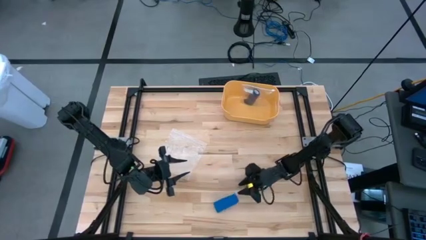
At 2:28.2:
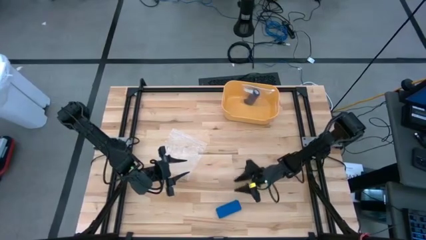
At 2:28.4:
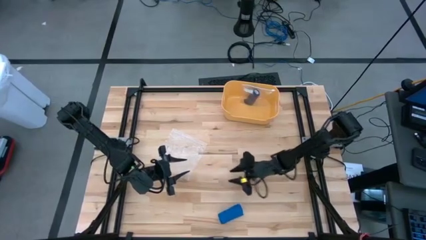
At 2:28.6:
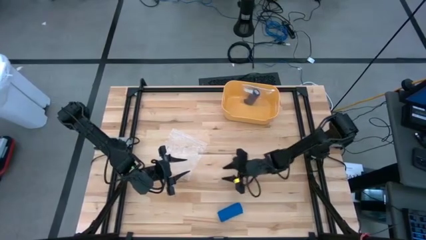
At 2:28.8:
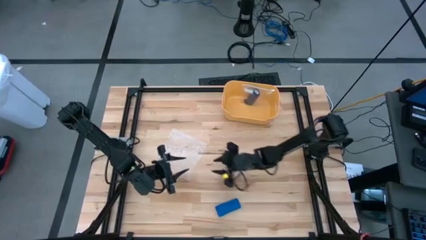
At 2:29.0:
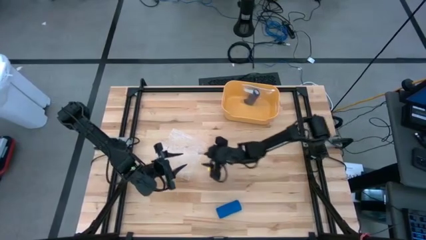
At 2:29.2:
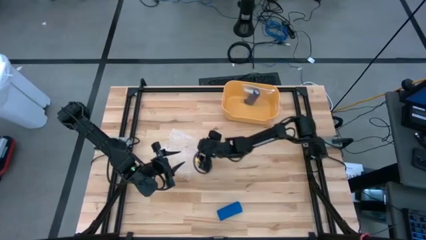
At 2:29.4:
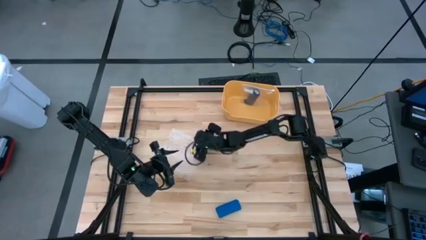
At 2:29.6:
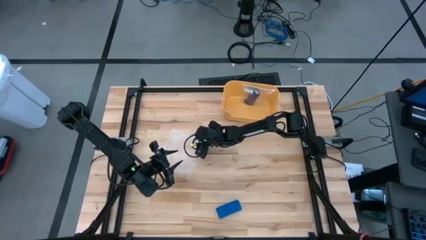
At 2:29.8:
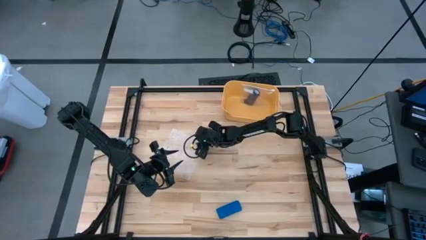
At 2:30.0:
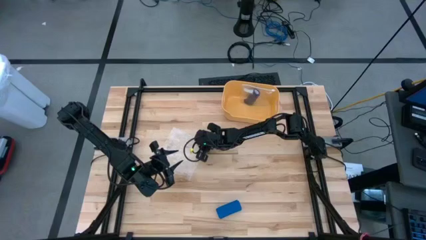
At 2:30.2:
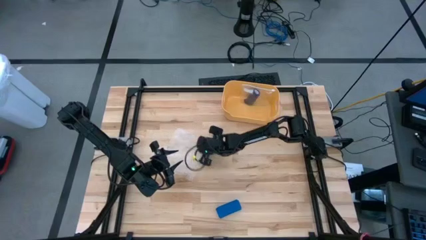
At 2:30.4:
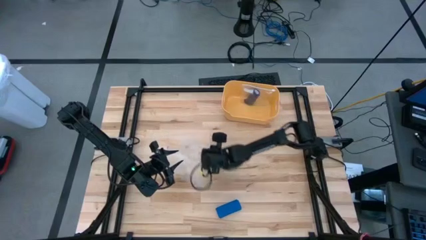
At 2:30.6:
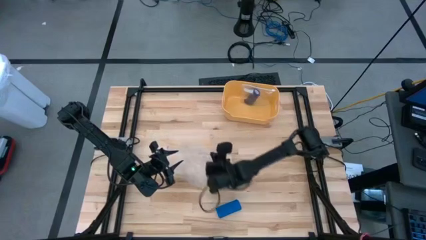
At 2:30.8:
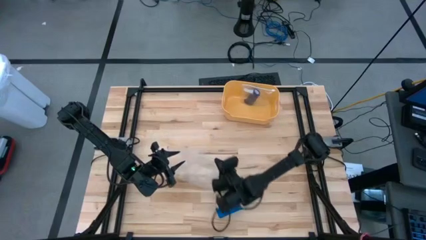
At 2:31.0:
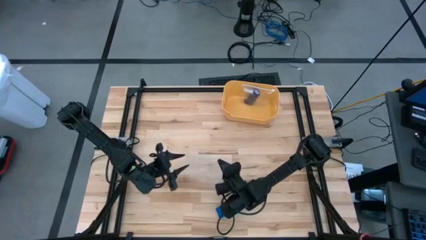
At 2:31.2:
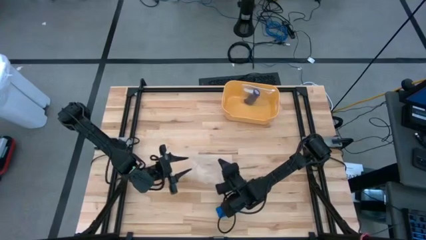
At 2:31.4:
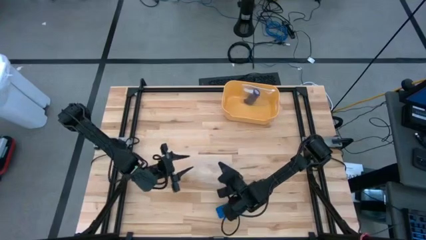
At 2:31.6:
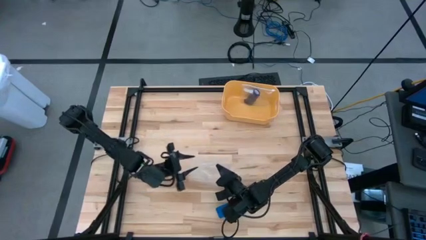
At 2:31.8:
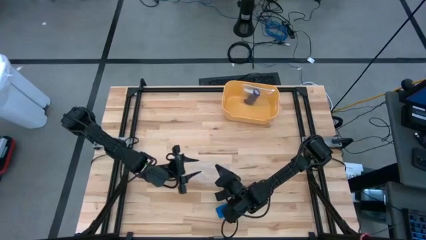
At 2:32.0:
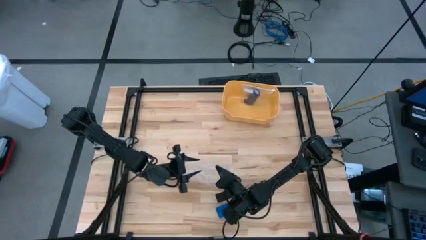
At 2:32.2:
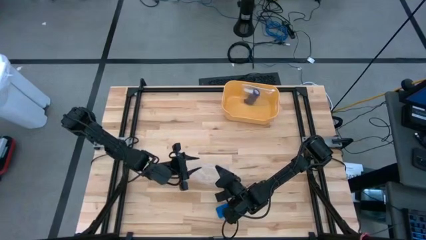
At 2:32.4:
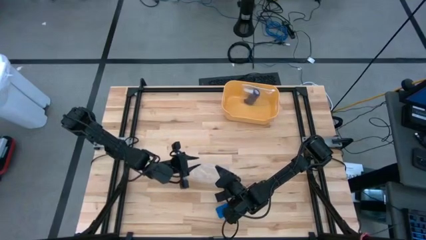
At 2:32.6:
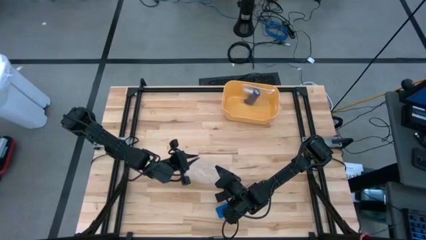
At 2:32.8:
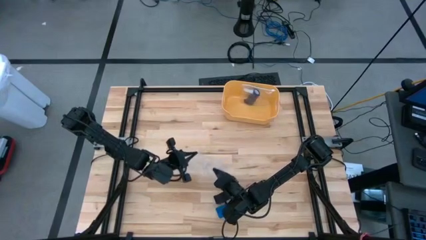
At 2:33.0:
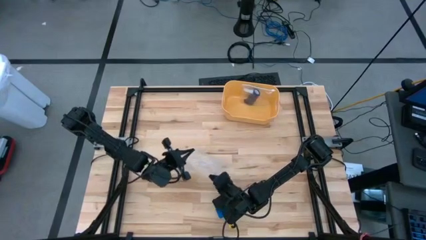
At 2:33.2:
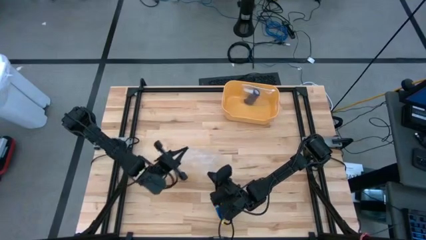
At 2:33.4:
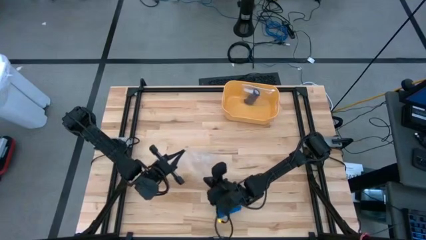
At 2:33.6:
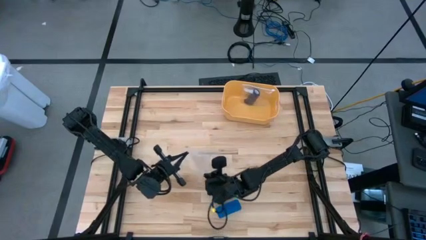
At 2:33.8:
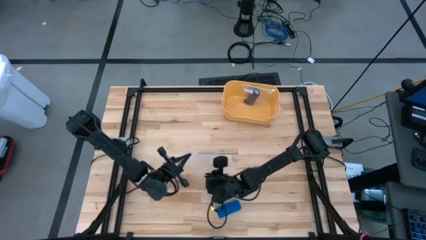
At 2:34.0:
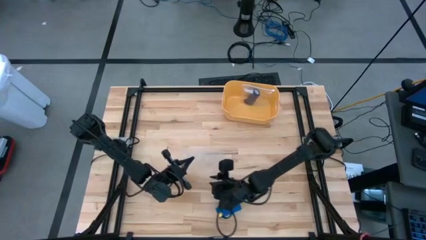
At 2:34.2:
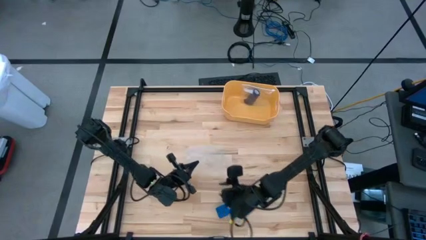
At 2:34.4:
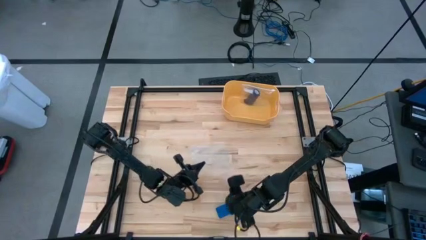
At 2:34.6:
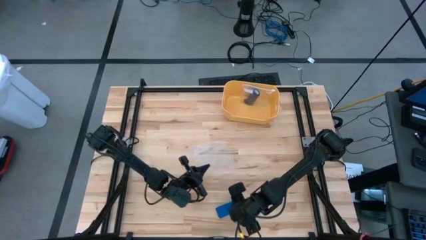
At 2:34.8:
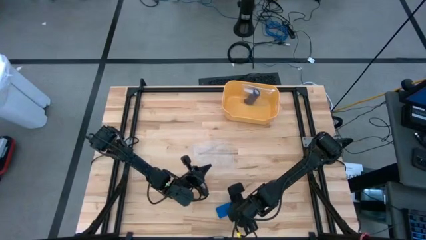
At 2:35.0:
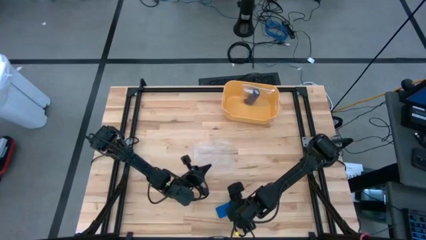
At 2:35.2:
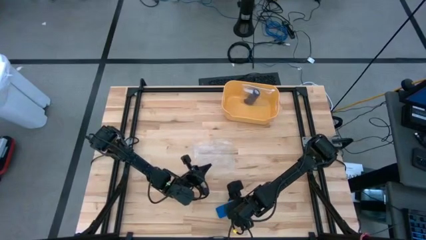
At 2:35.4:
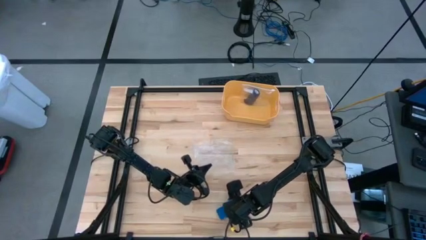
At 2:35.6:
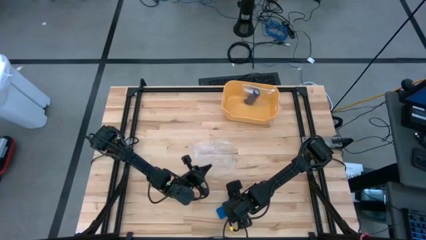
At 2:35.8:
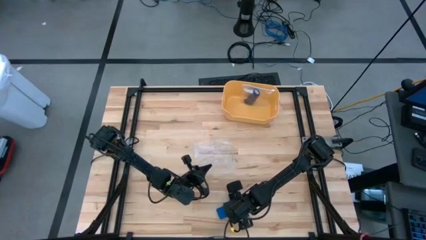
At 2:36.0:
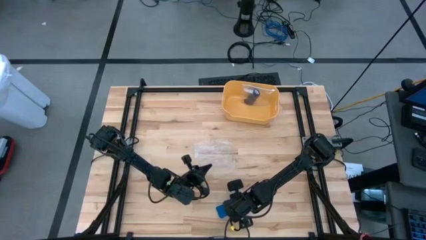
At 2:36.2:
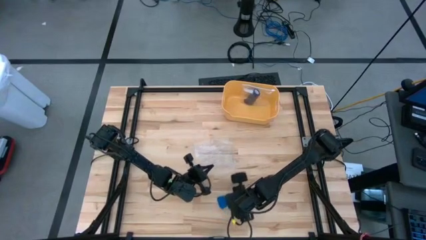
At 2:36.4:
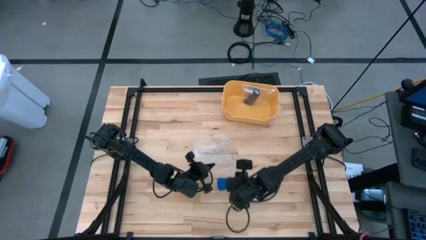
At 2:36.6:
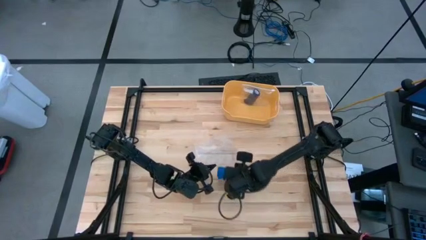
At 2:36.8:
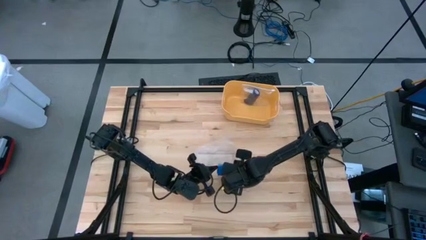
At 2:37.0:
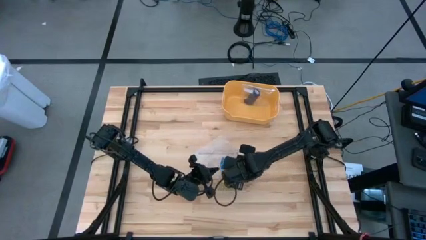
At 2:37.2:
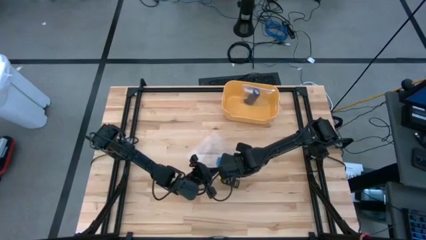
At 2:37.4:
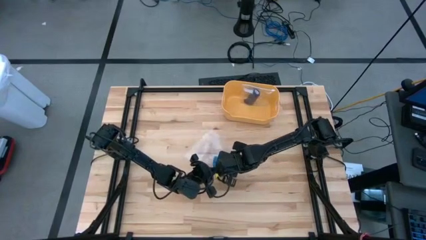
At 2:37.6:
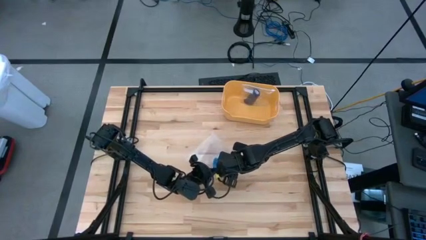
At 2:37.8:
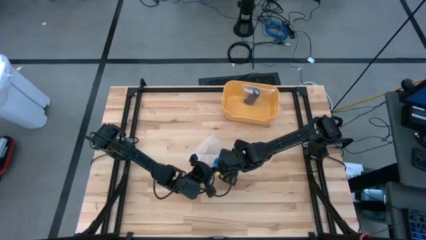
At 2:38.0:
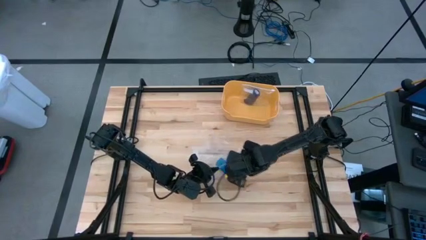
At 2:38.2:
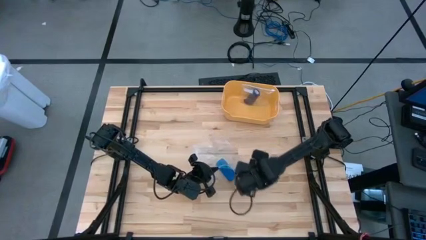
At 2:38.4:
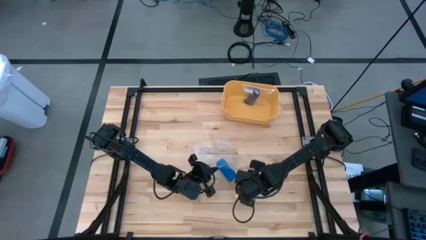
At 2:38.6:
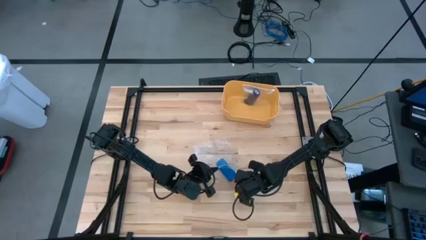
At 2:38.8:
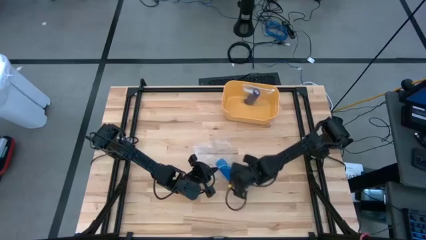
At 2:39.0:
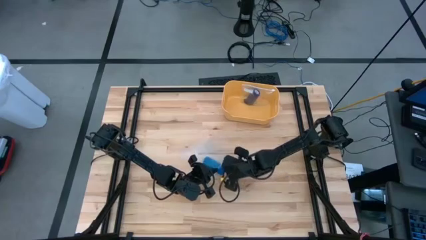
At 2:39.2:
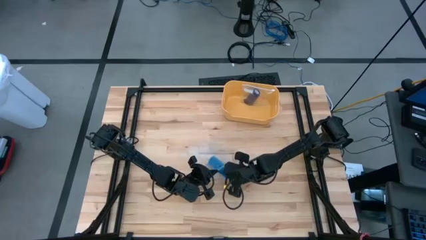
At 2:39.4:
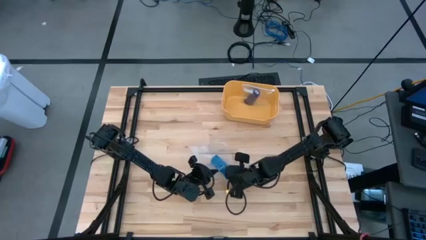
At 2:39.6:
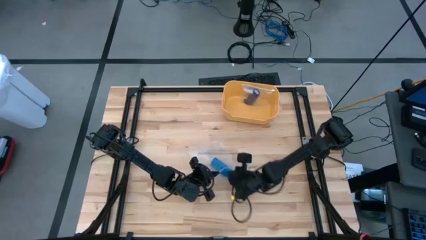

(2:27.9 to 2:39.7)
Task: Roll bandage
Put the blue bandage into the transparent zip bag

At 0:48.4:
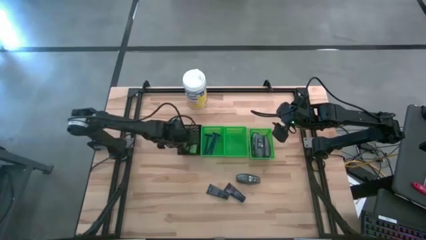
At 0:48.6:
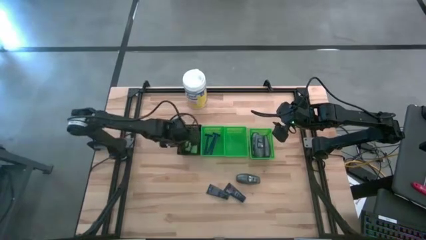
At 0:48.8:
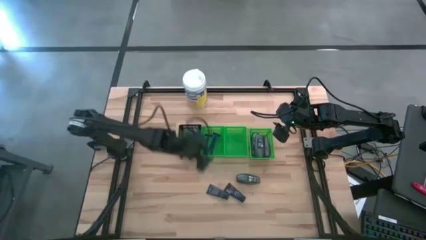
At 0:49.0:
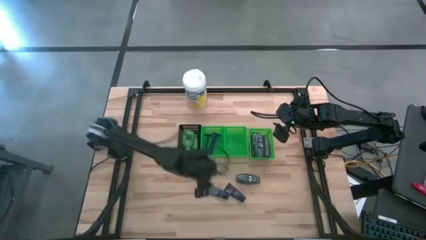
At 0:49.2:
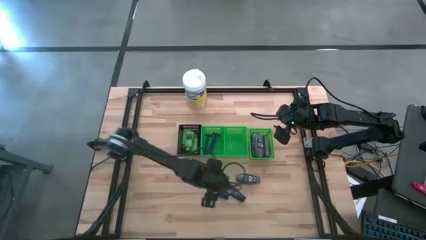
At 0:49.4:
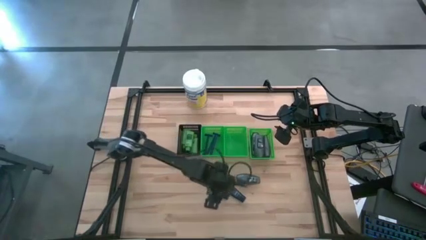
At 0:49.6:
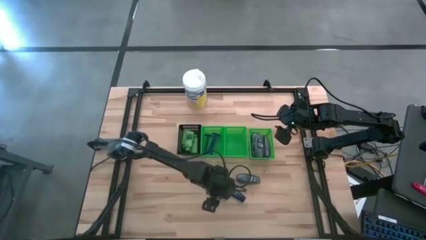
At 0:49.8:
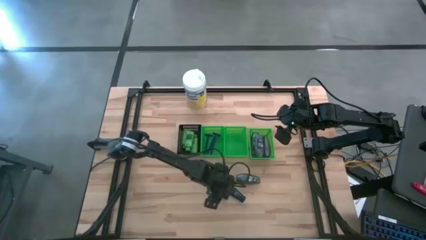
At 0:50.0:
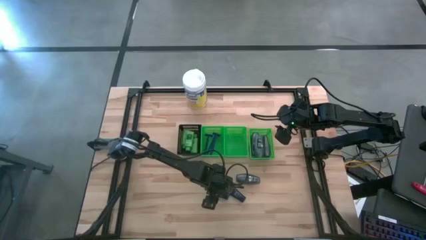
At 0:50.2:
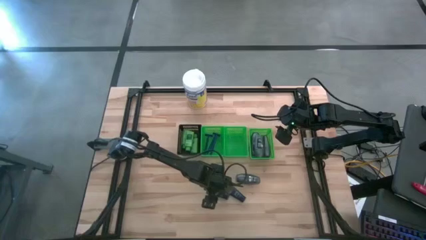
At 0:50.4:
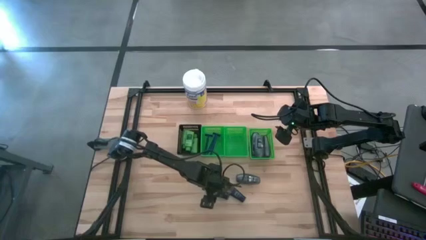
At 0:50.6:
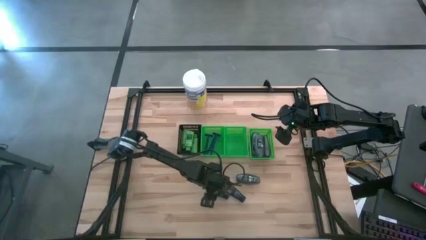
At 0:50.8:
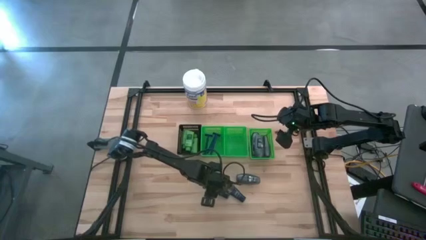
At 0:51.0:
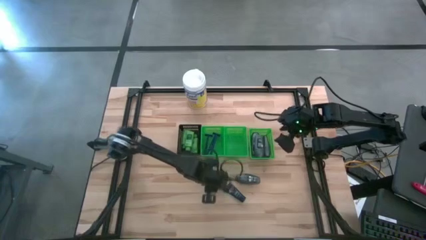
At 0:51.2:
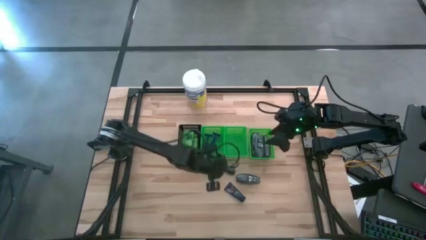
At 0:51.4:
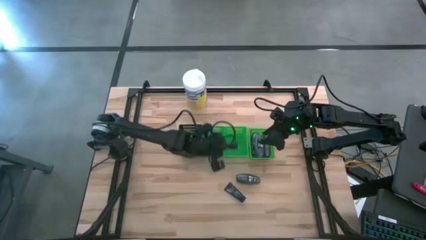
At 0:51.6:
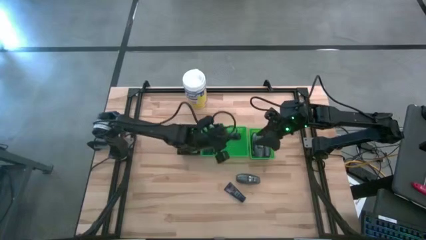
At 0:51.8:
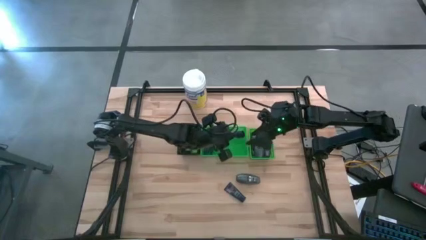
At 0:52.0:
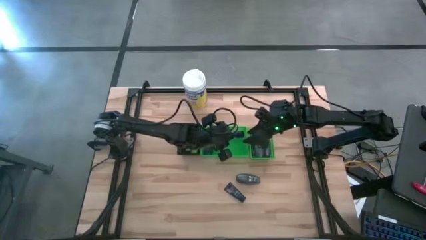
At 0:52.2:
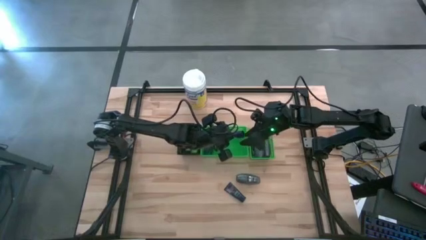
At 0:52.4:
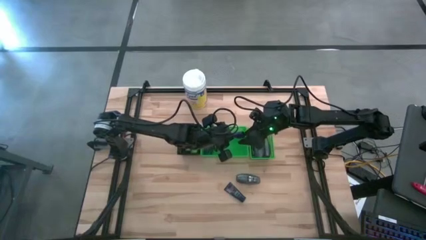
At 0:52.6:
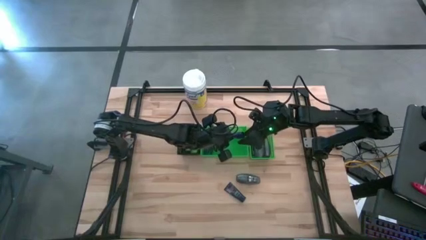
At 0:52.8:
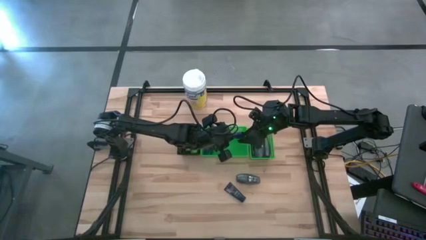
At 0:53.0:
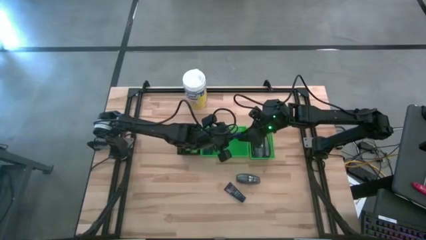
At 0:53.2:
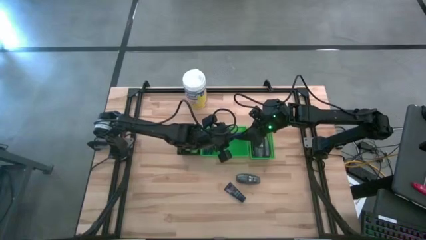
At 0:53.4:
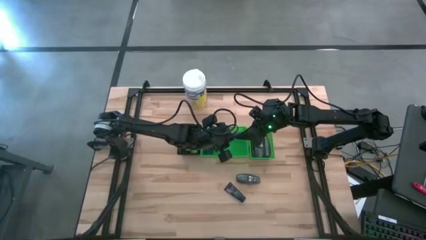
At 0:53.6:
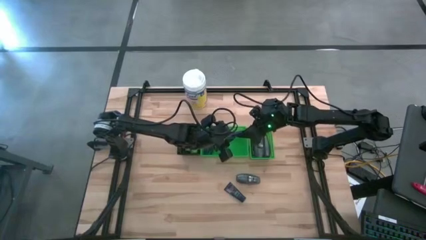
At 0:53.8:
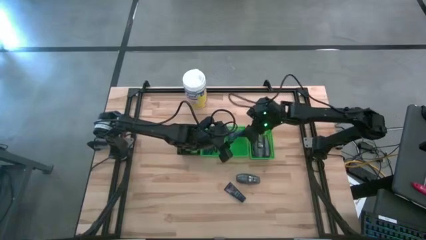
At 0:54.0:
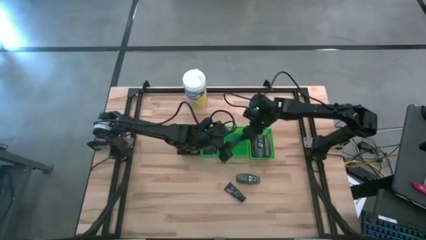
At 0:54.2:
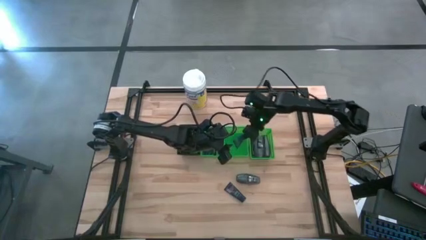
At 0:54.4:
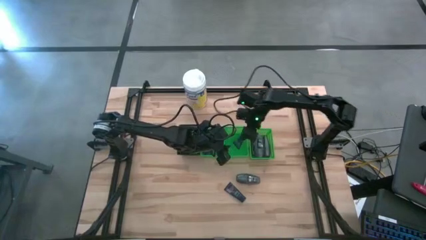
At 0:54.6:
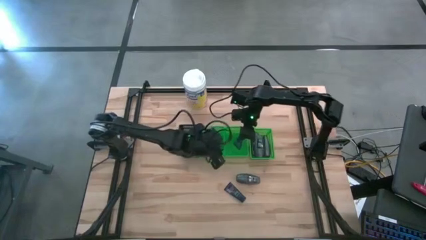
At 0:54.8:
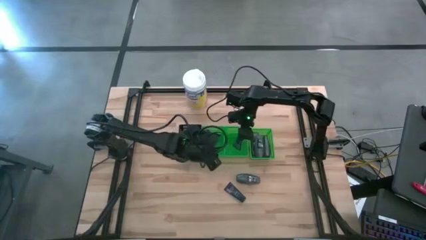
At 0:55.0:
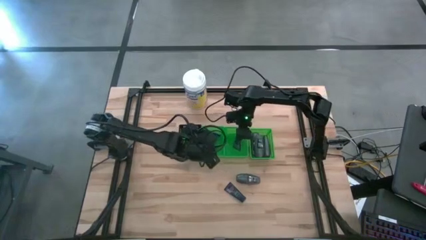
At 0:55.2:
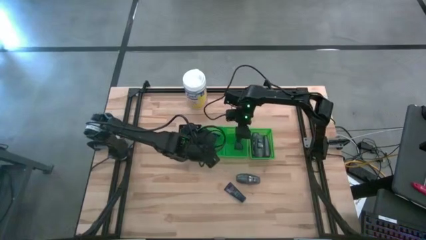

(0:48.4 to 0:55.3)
Task: Pick & Place Travel size toiletries
Put the shave cream into the middle green bin
